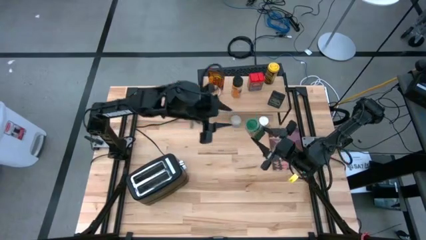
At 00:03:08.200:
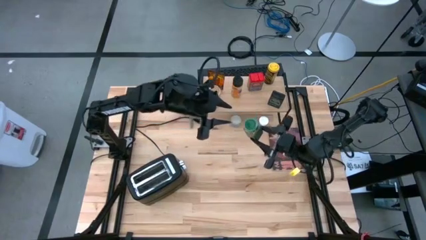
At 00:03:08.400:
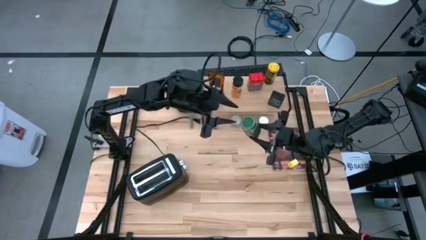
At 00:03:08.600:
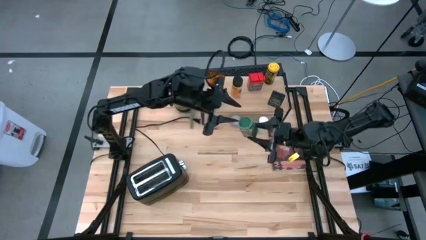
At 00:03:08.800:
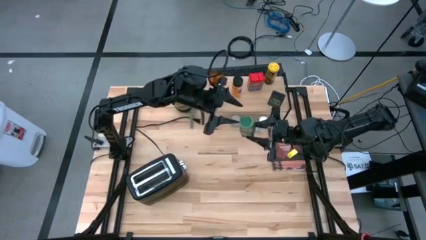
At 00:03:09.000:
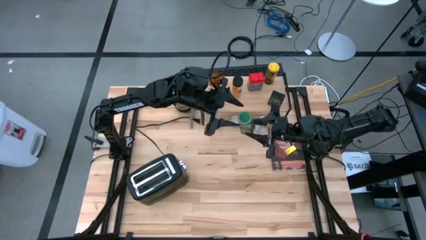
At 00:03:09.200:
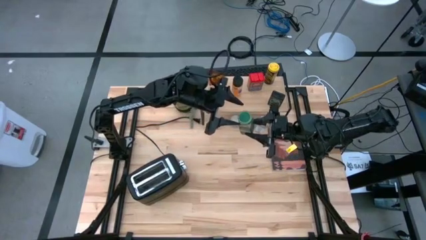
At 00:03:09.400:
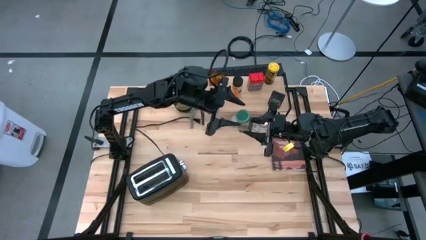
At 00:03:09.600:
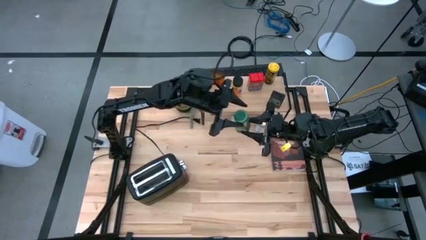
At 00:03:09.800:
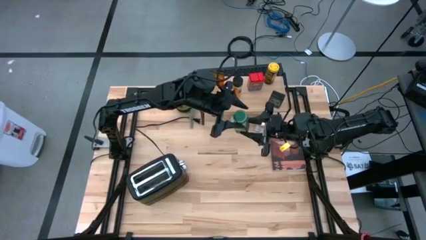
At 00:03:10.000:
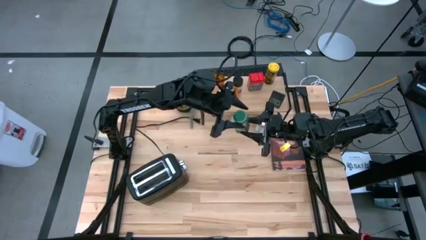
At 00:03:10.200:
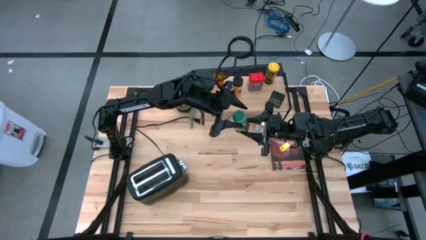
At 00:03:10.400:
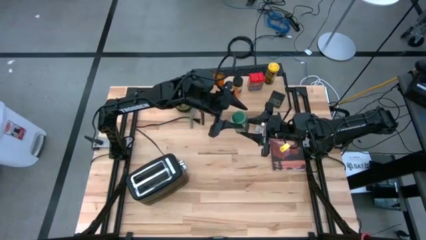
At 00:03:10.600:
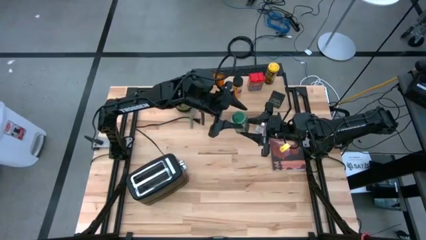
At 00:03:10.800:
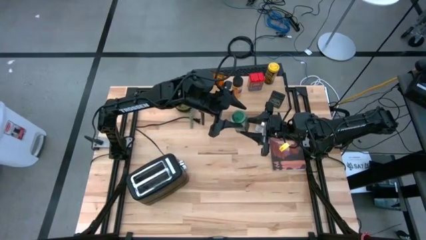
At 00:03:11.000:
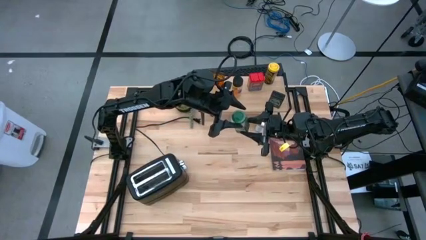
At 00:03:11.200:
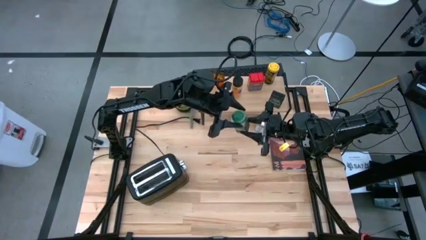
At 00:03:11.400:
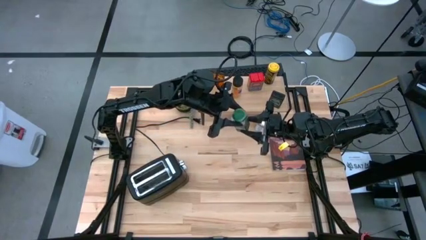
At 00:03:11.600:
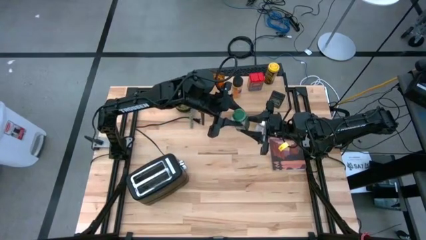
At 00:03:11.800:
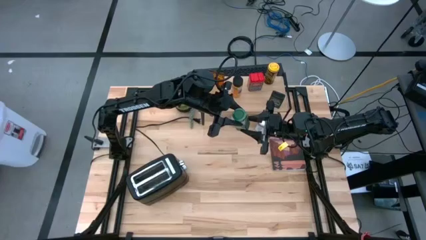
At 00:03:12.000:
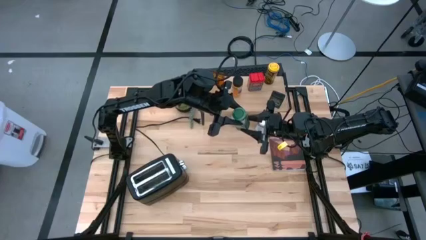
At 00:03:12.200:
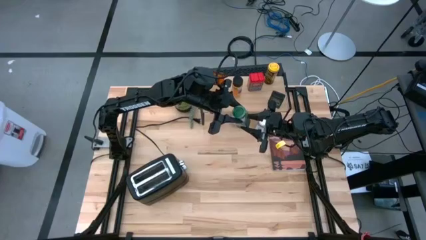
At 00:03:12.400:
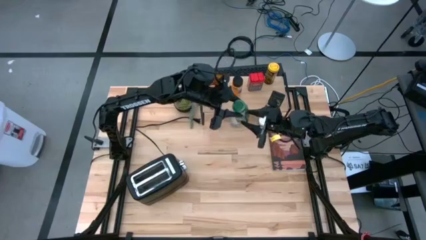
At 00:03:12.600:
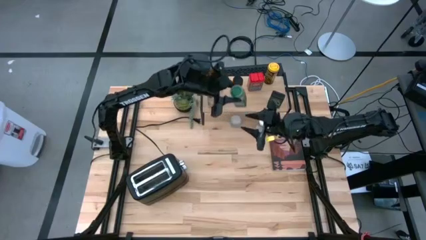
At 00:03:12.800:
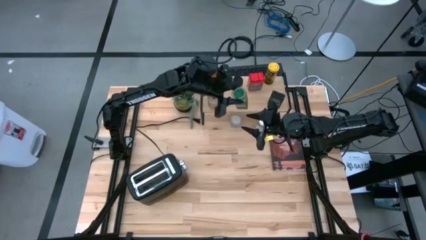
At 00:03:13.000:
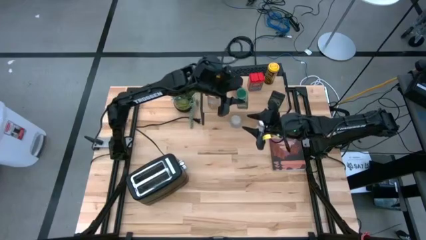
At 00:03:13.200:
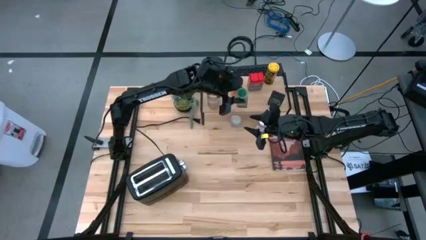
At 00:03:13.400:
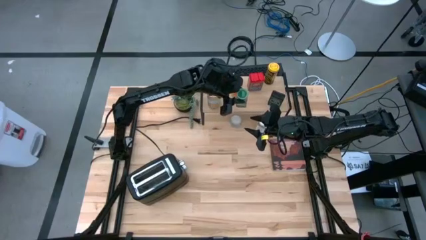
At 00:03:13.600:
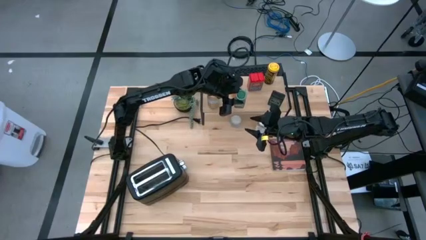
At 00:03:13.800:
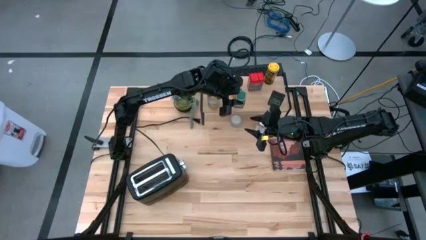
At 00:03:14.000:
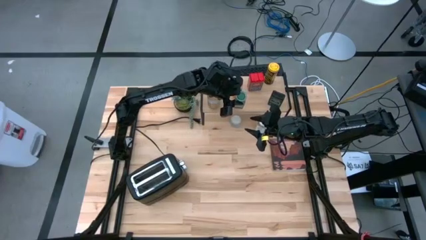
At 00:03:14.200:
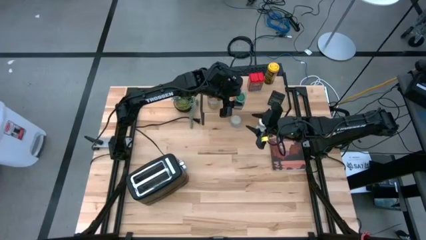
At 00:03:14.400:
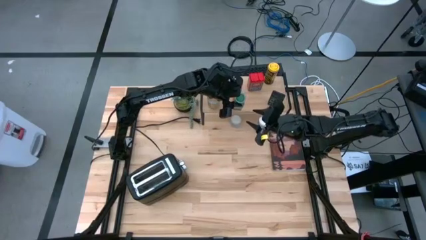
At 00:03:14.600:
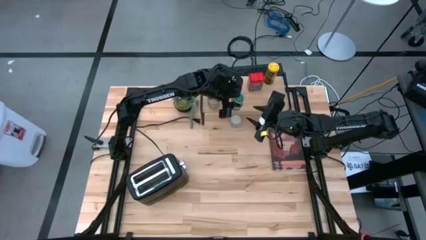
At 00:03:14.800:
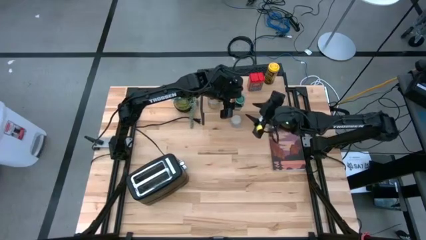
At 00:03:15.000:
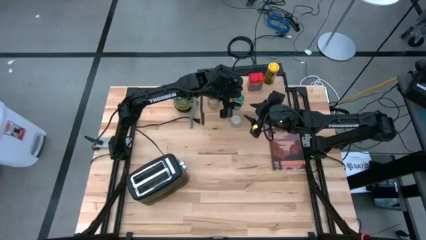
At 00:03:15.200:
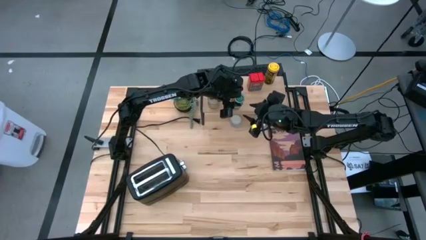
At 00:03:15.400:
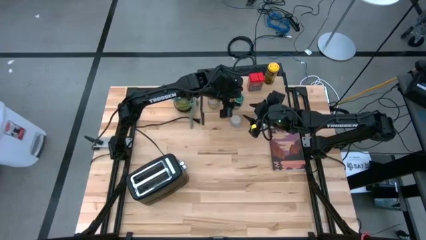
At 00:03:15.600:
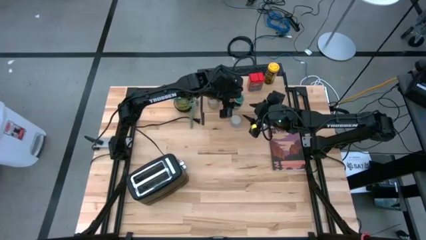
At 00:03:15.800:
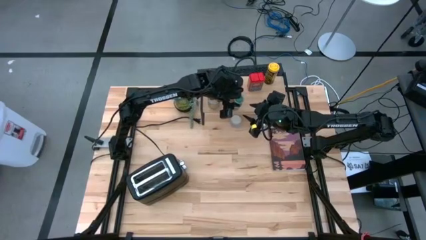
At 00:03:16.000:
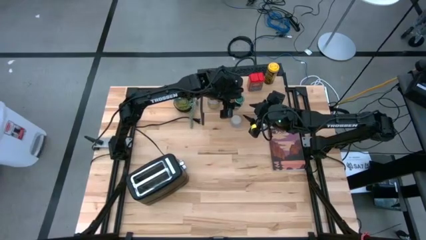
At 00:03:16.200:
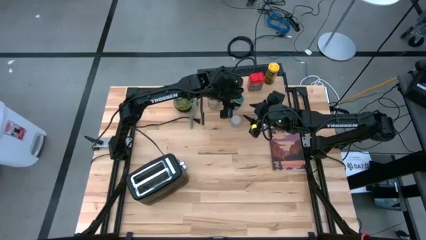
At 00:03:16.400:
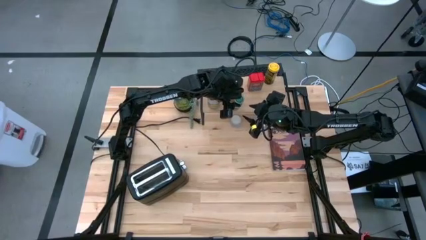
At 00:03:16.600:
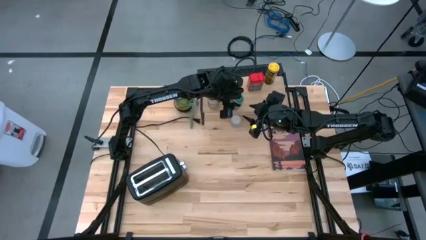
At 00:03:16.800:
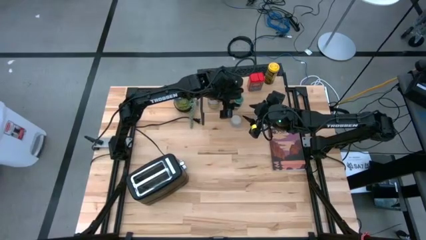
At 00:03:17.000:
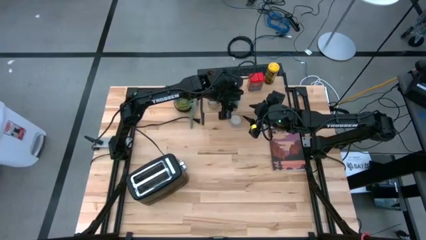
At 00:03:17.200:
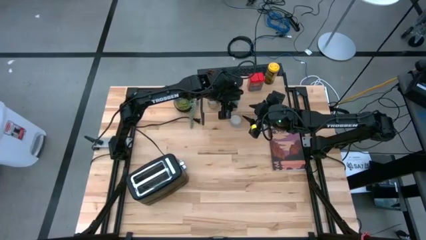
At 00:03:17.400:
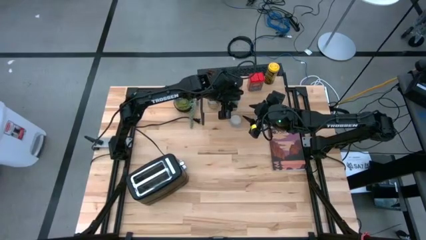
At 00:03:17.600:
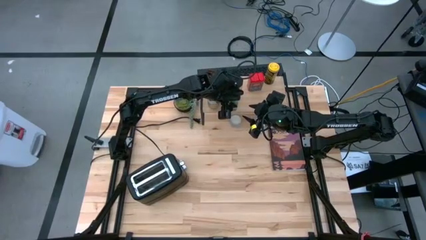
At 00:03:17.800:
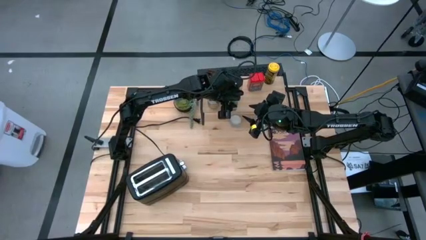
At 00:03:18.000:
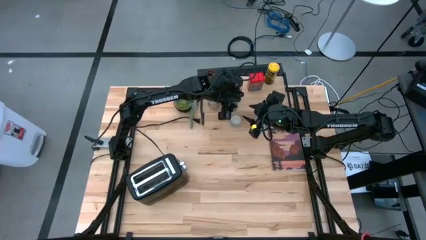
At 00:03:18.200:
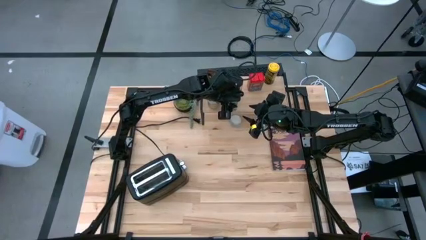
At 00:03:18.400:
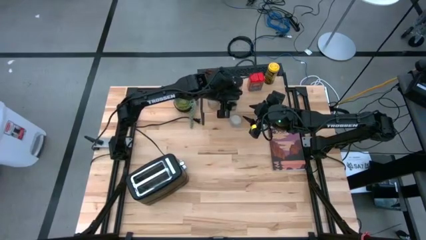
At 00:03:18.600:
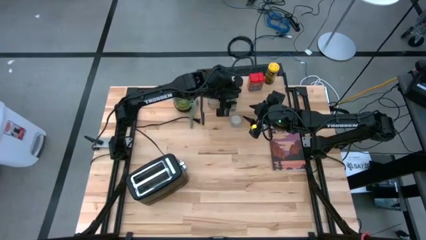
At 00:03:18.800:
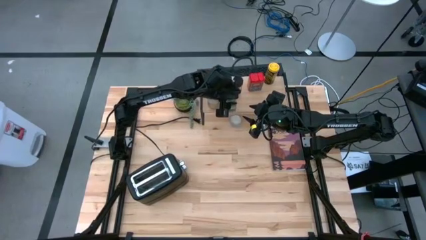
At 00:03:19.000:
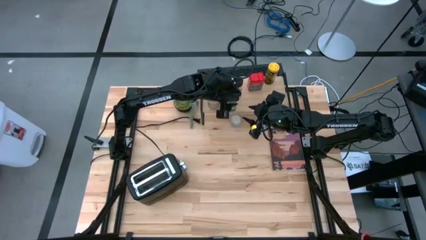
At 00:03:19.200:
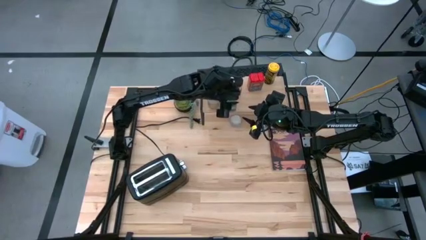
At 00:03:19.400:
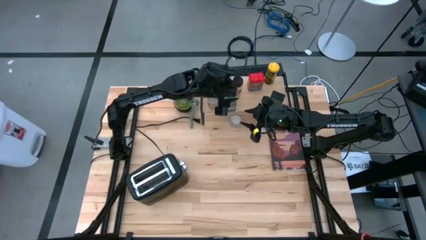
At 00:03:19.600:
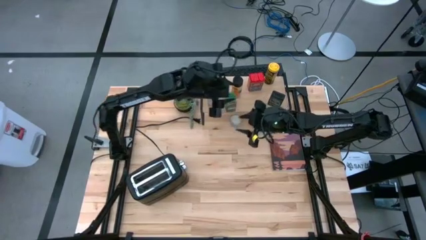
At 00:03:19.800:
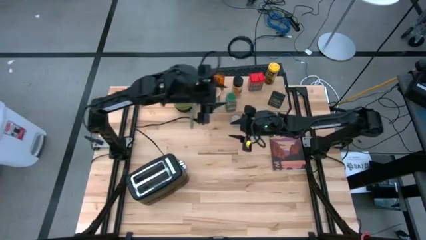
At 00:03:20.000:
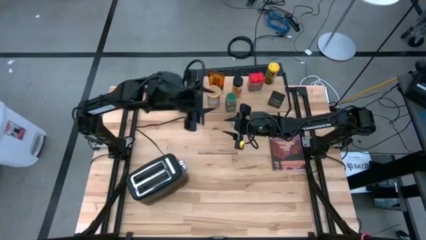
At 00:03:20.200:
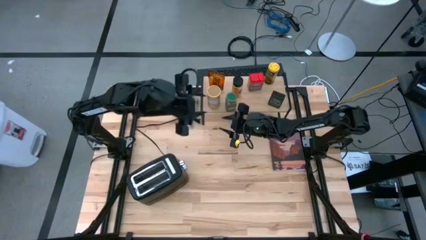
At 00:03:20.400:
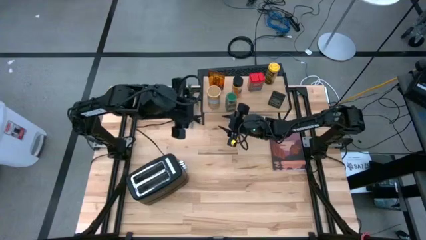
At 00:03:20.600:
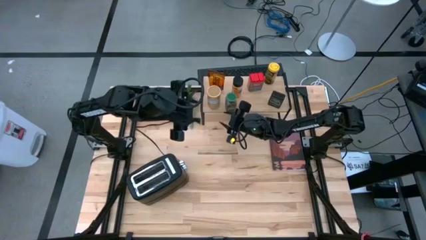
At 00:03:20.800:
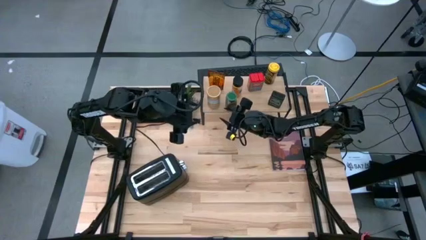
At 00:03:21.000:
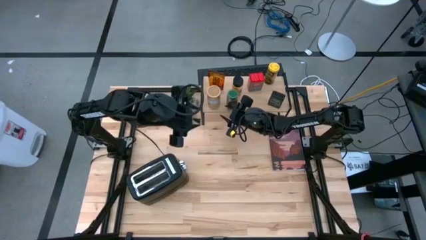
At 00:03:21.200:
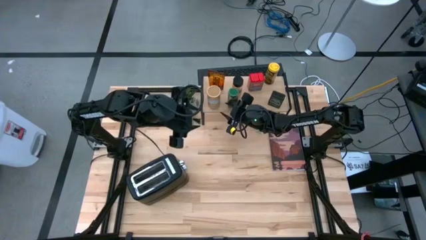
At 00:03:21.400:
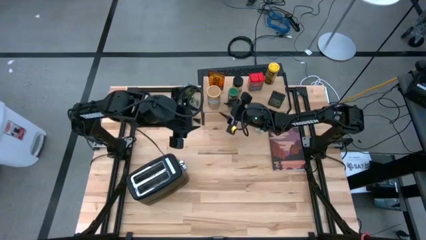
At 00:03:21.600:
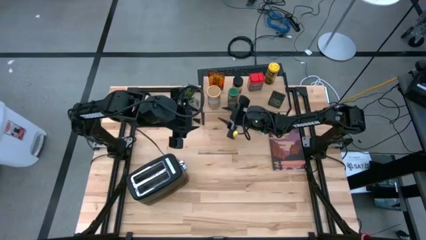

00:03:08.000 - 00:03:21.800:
Task: Shelf spices
Put the green seasoning bottle on the shelf

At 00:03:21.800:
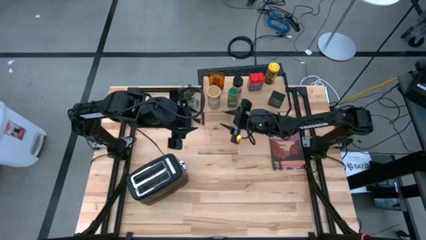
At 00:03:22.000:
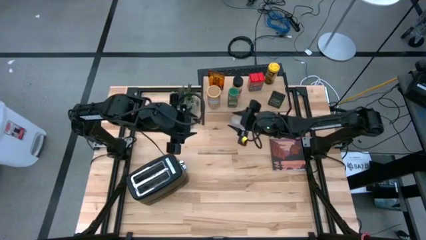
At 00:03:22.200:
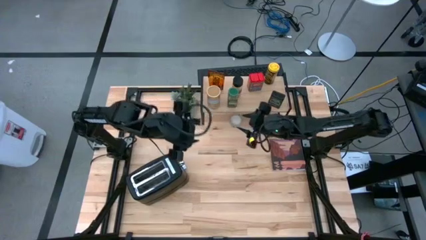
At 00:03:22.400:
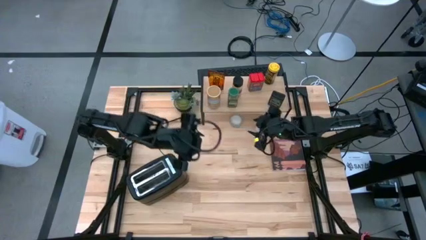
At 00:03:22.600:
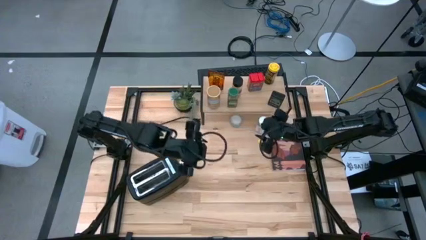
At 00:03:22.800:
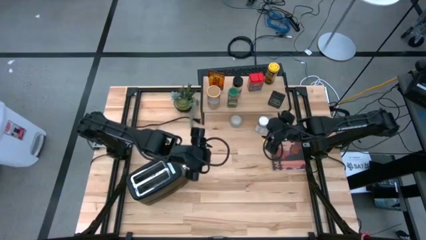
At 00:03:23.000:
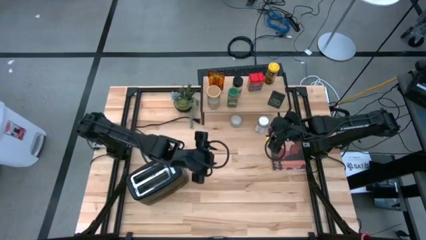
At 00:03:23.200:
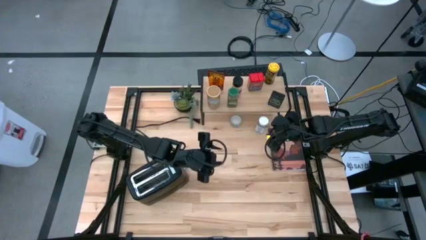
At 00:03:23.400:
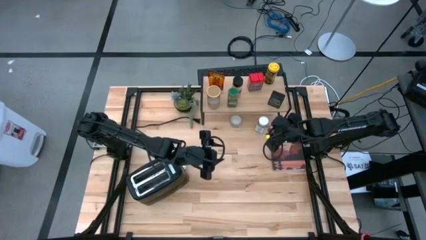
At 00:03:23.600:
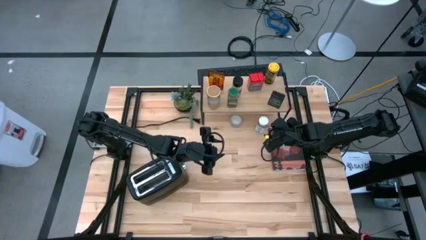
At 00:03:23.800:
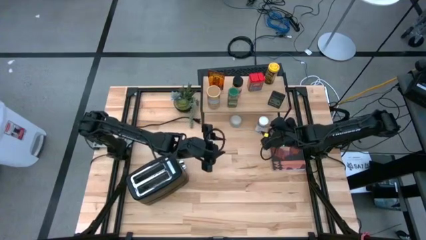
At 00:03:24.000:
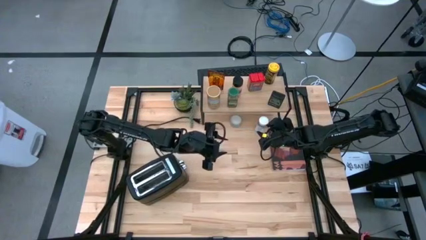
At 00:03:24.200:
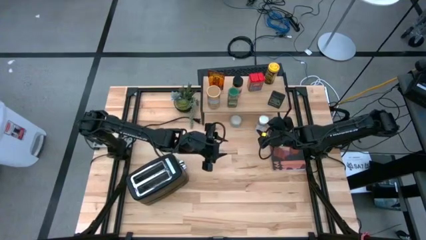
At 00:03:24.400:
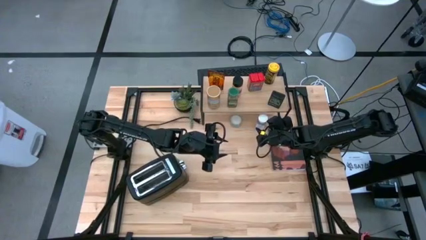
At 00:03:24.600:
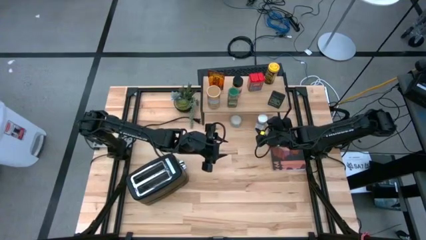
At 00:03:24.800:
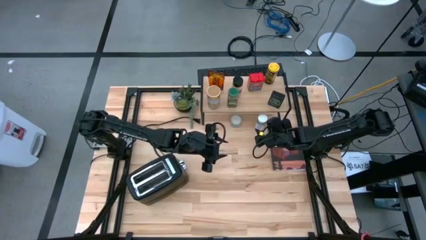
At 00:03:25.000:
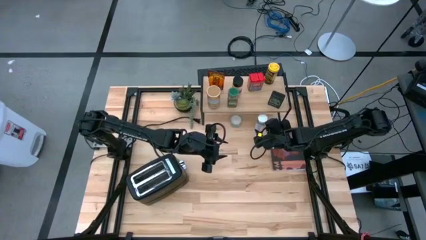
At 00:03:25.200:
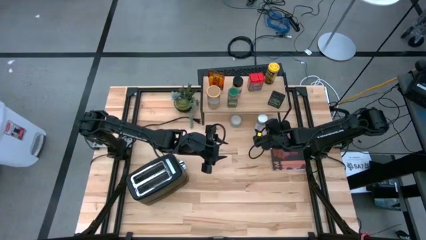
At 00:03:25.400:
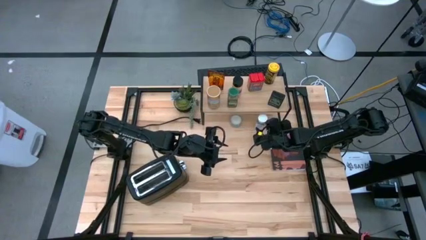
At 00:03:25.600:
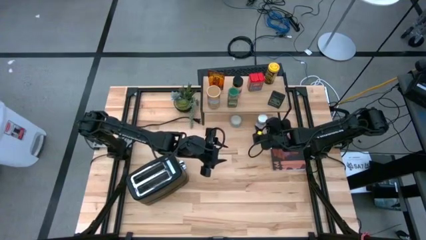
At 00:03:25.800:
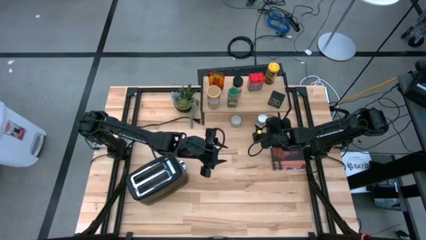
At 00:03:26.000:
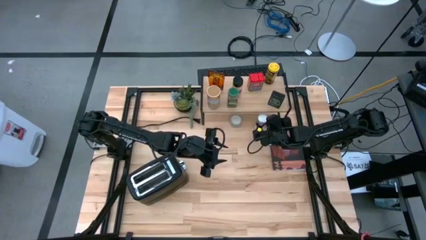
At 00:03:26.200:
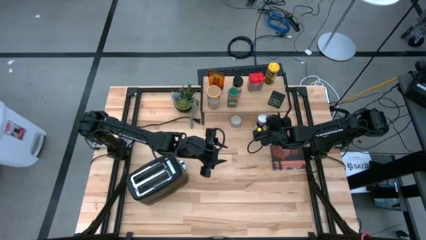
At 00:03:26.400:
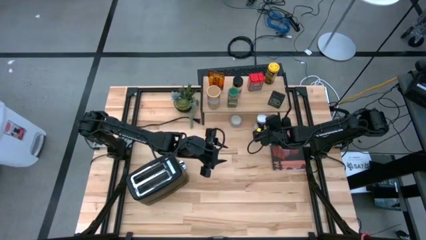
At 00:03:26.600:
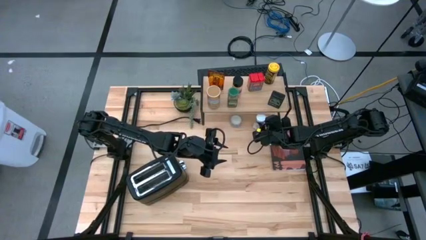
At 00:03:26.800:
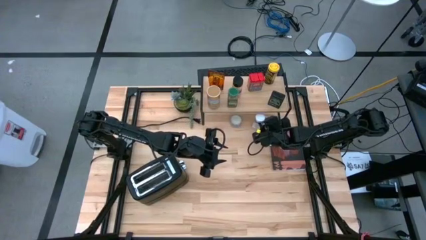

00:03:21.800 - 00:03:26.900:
Put the white seasoning bottle on the shelf
